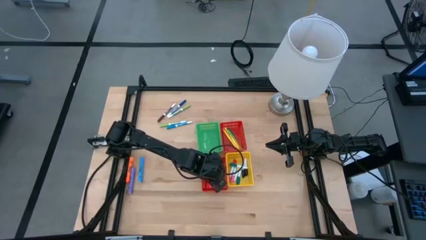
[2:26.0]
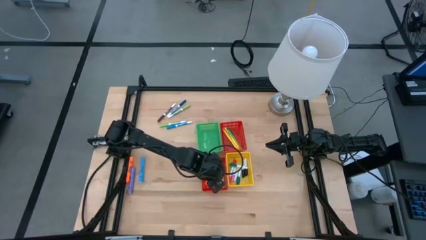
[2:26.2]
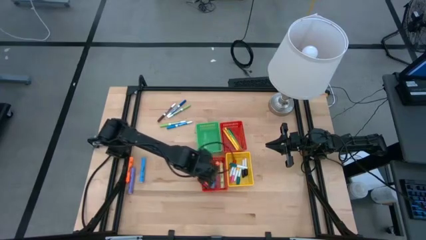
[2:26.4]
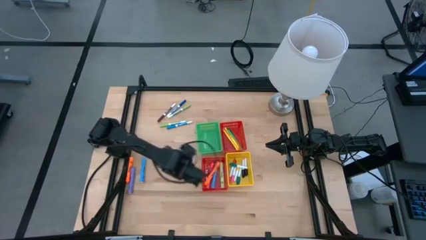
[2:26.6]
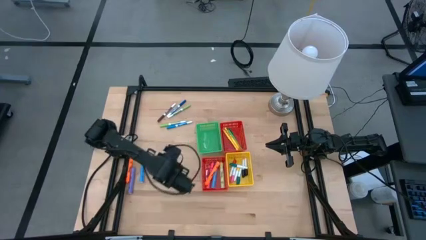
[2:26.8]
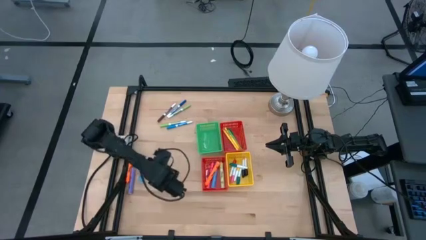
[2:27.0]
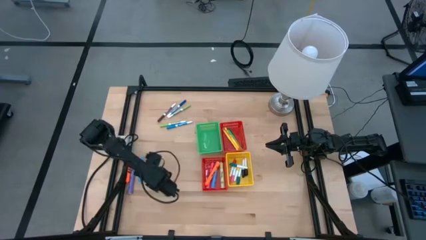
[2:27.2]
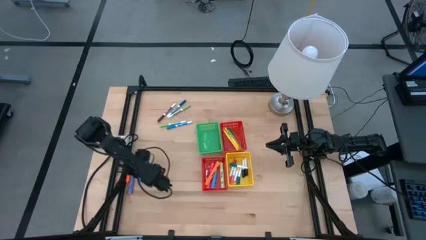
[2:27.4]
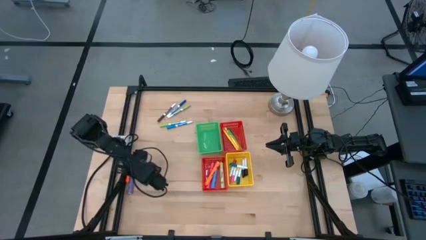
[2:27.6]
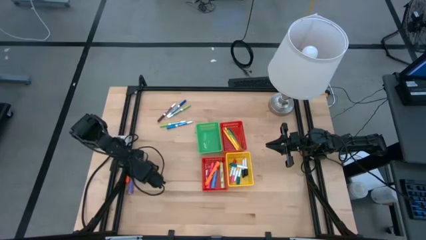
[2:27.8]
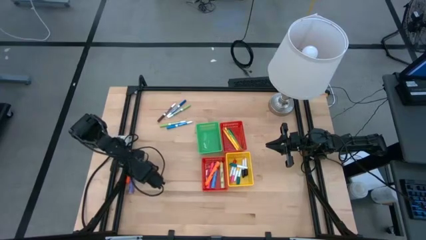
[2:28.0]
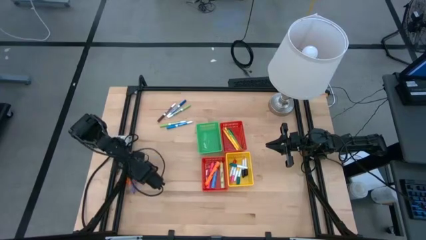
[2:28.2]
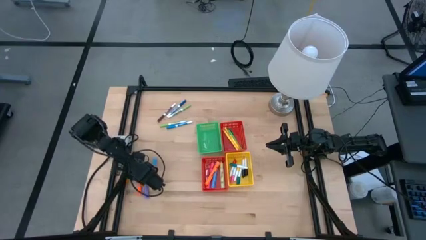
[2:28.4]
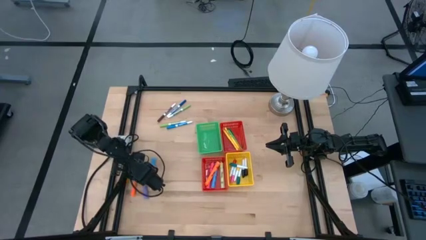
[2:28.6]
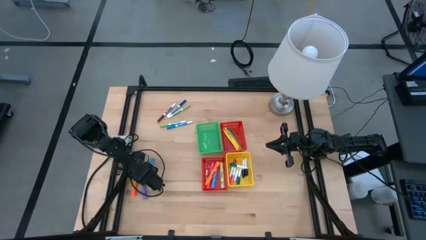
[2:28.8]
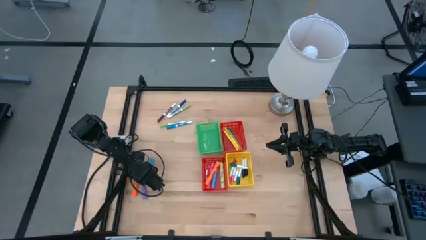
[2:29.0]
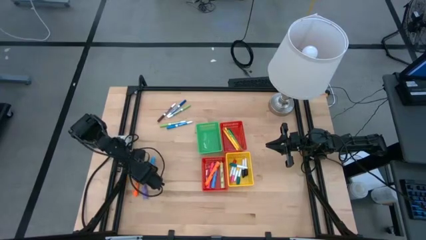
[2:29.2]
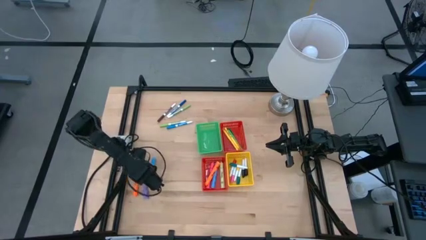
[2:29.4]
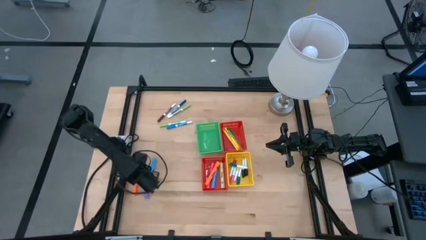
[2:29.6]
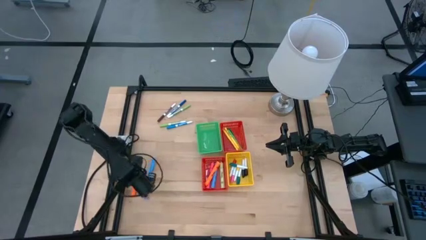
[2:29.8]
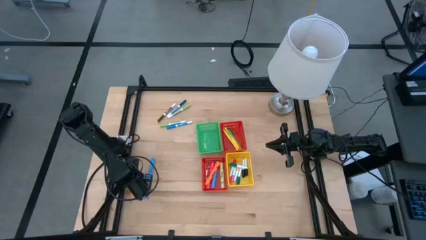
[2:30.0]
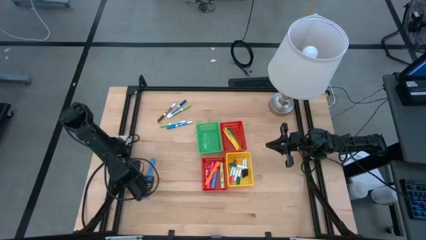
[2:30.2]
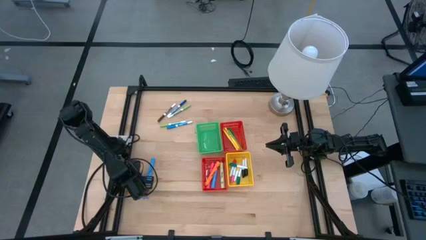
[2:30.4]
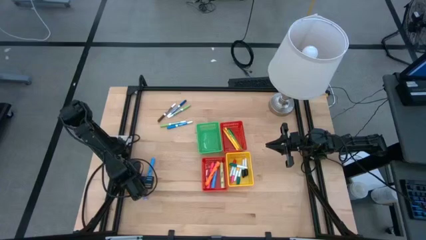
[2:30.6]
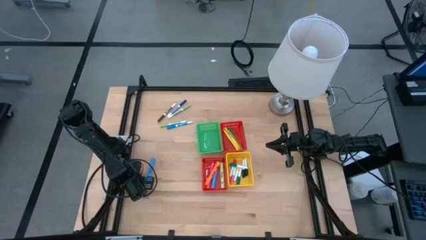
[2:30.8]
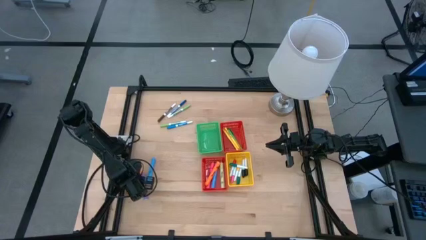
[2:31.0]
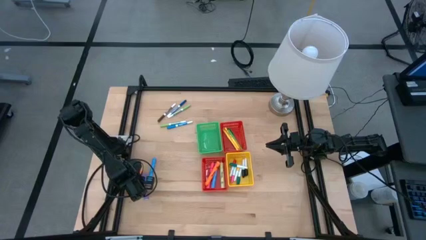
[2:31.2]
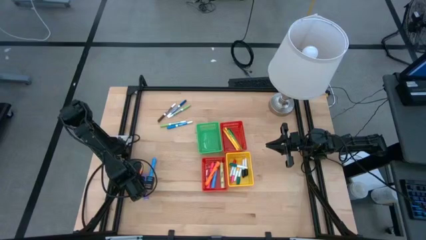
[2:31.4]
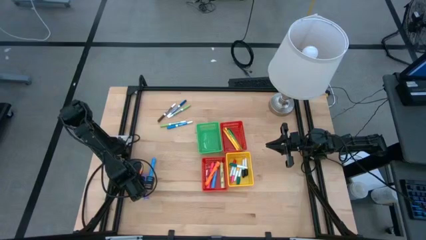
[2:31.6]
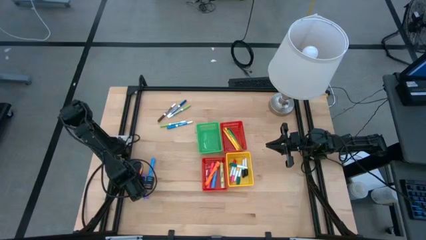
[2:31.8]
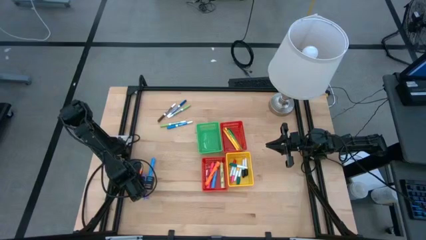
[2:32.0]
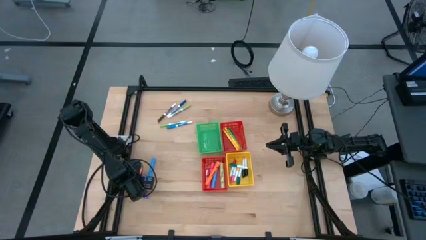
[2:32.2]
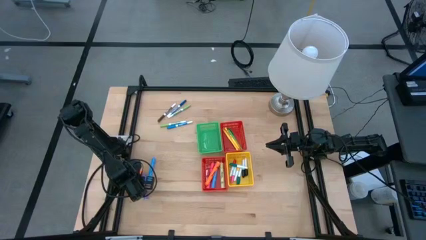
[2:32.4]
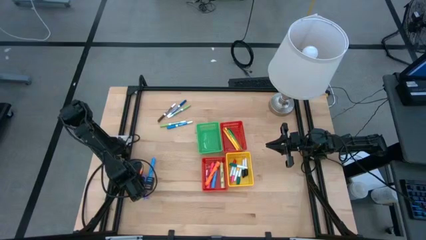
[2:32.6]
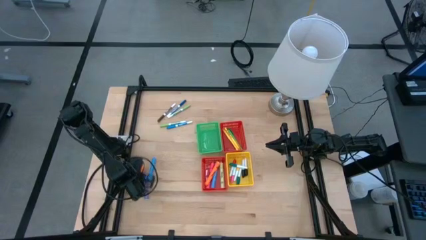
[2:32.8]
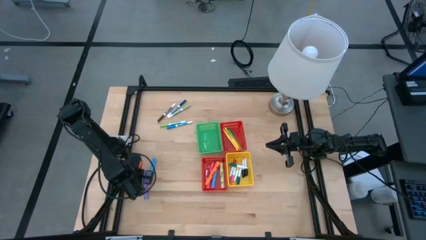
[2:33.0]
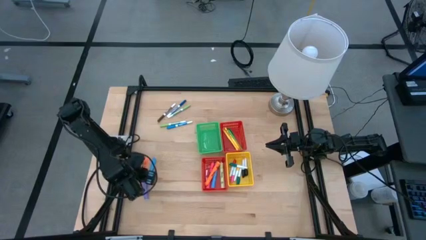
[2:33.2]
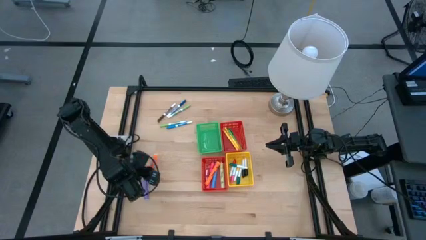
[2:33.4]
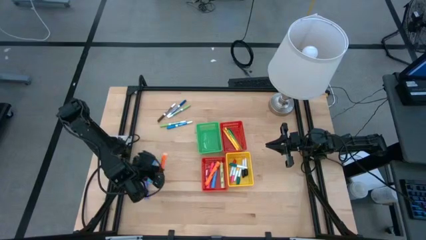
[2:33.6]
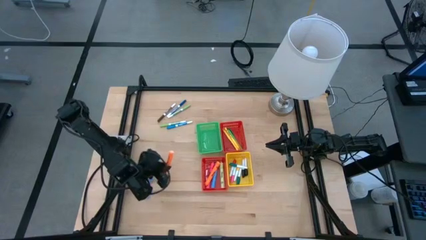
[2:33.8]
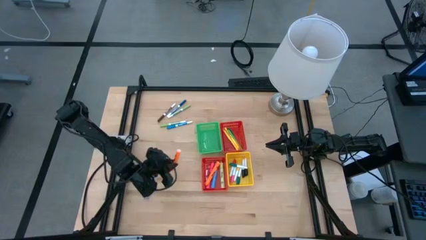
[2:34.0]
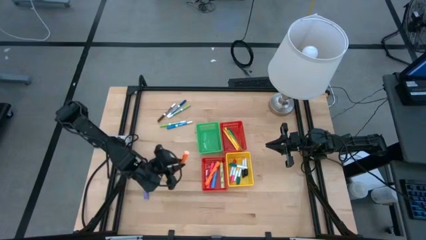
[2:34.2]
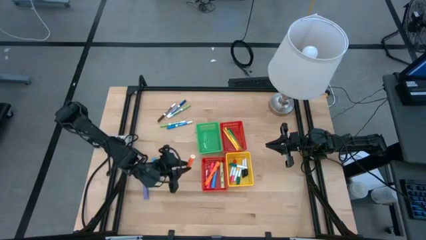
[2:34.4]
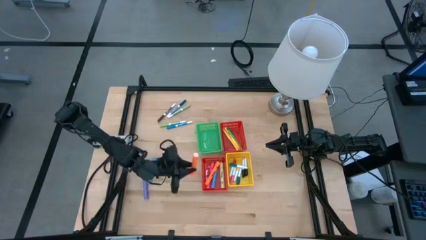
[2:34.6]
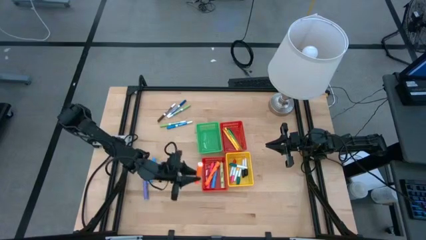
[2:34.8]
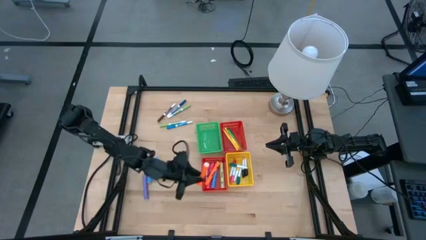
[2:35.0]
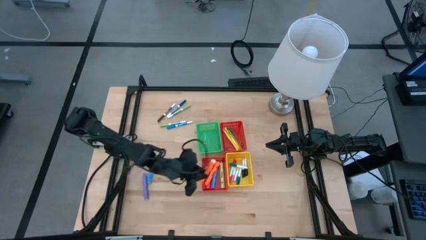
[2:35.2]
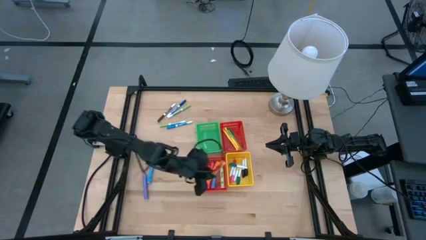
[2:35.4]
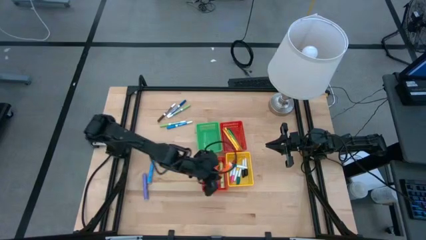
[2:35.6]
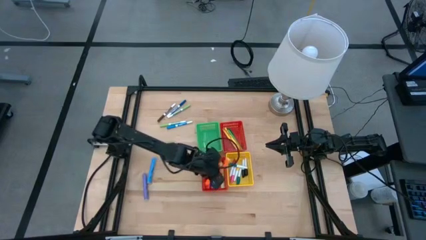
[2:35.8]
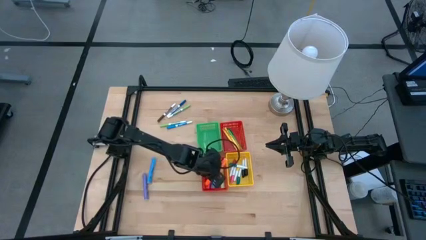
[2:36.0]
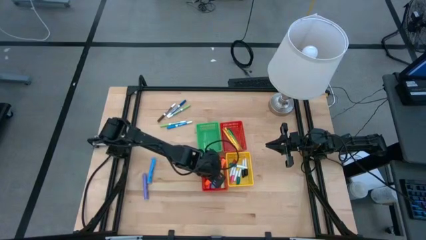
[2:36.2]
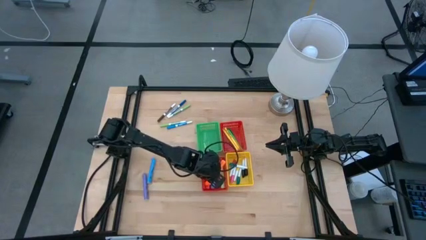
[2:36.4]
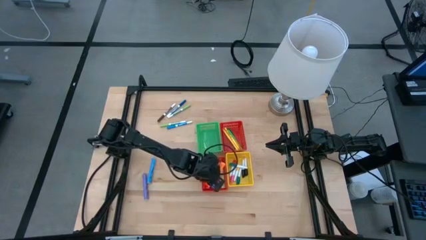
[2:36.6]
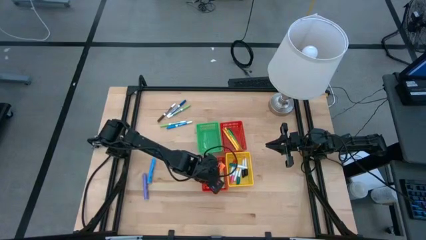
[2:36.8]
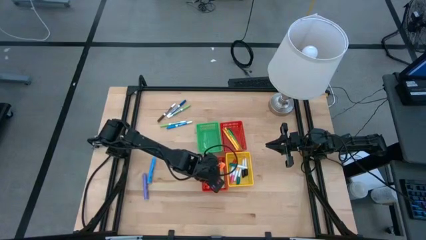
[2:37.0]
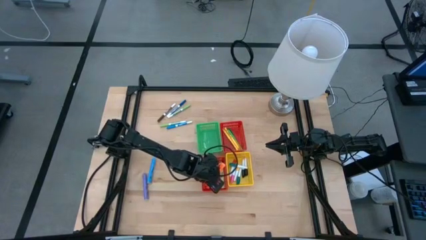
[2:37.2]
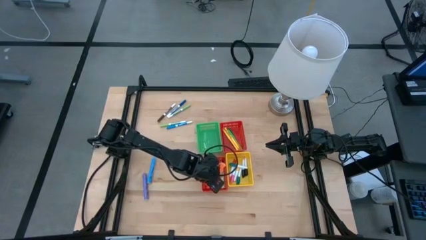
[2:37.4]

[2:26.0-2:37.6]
Task: Pick & Place Markers
Put the large orange highlighter into the bottom red bin
